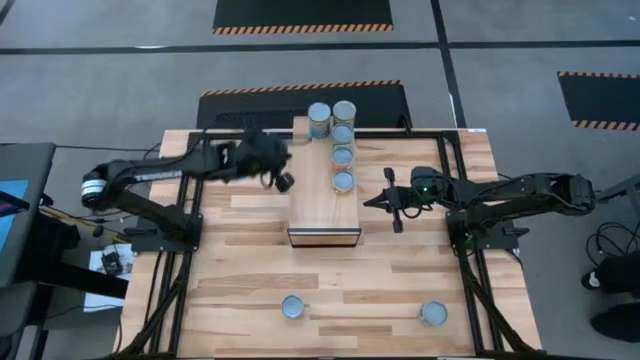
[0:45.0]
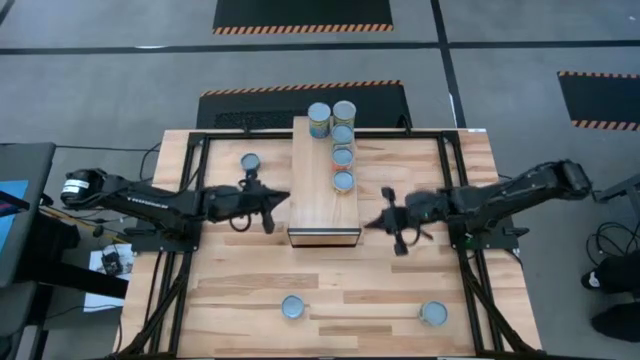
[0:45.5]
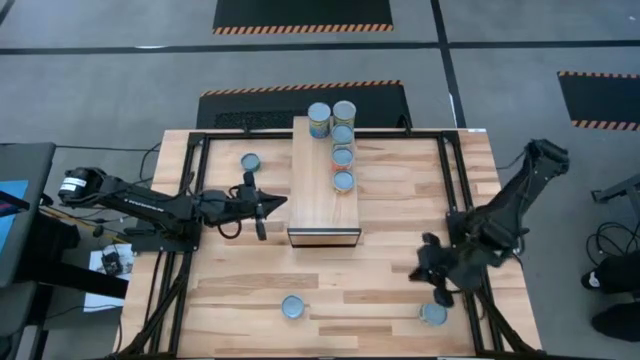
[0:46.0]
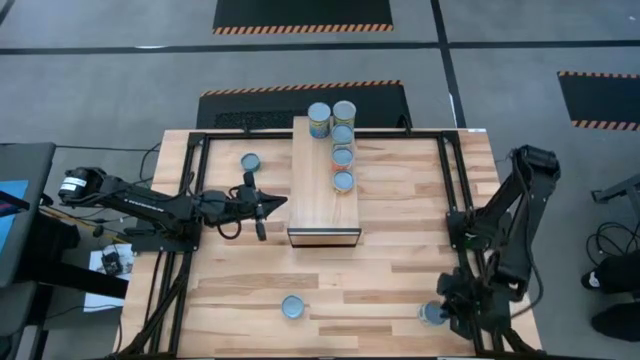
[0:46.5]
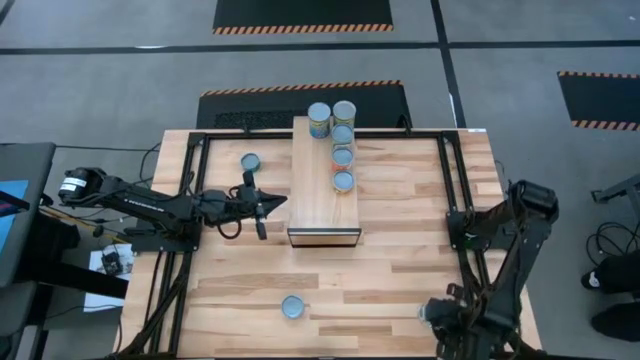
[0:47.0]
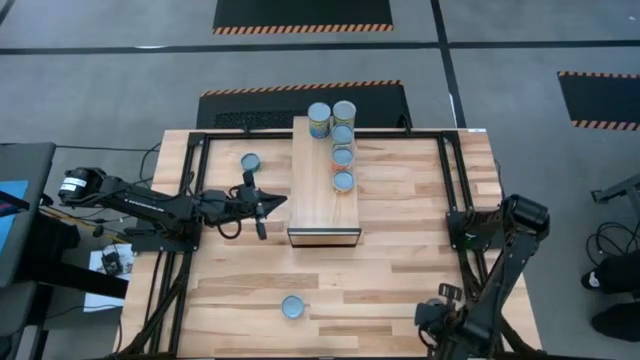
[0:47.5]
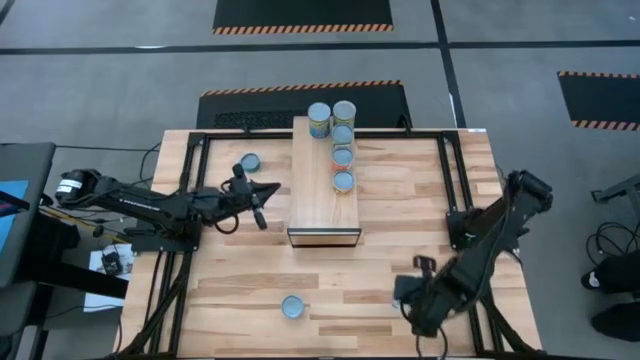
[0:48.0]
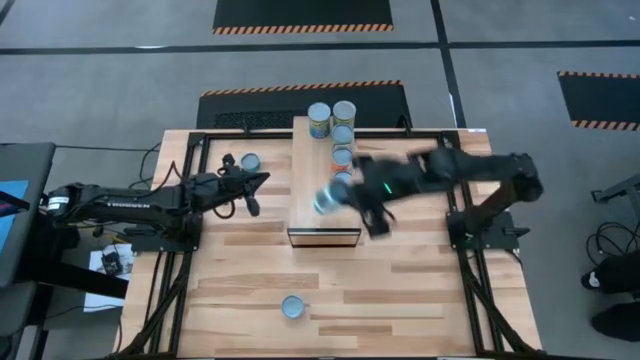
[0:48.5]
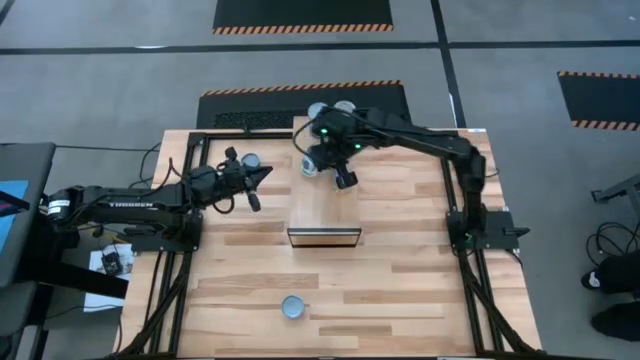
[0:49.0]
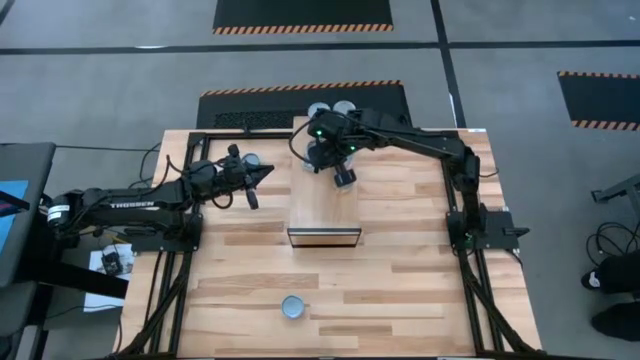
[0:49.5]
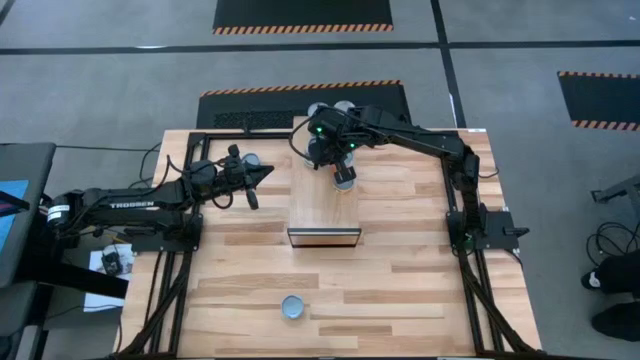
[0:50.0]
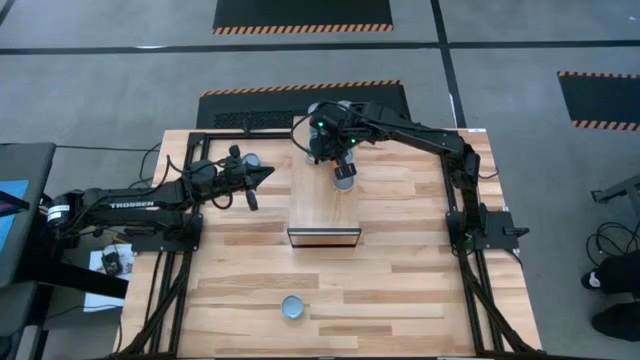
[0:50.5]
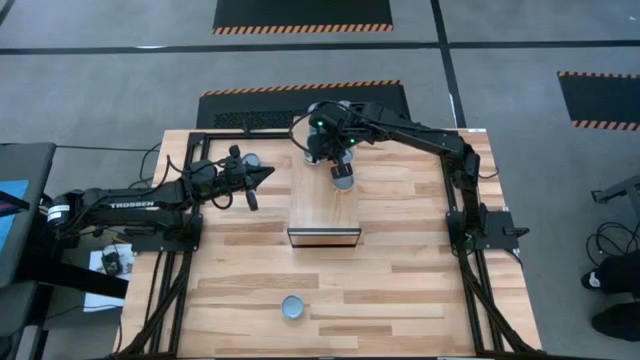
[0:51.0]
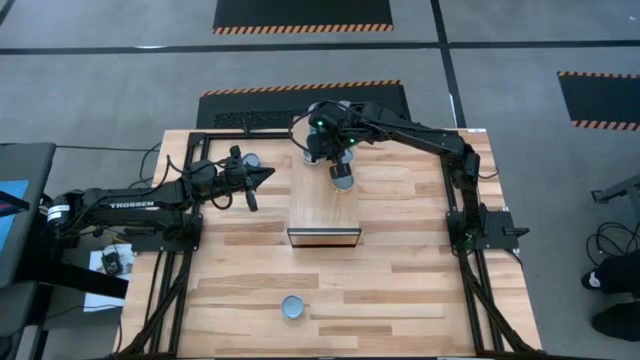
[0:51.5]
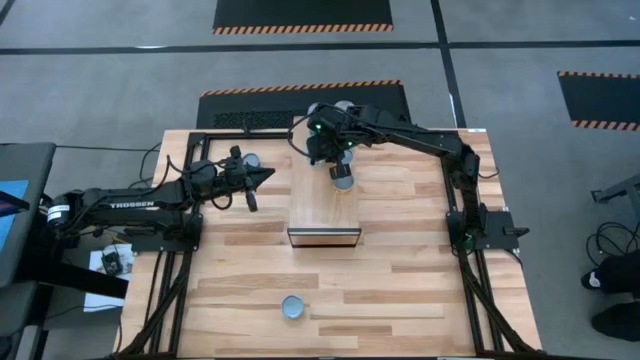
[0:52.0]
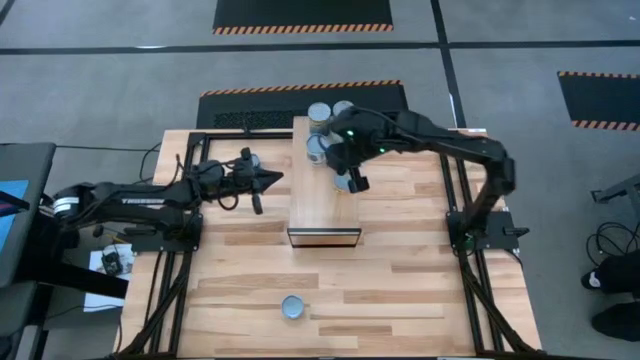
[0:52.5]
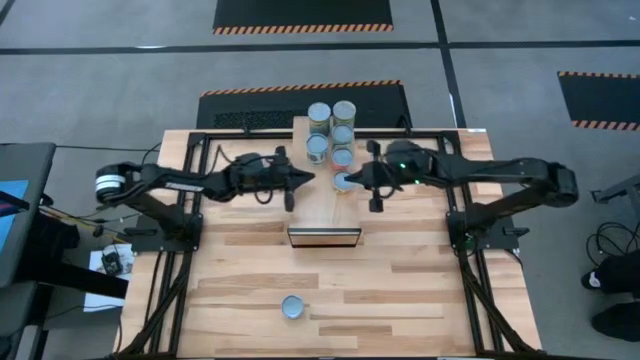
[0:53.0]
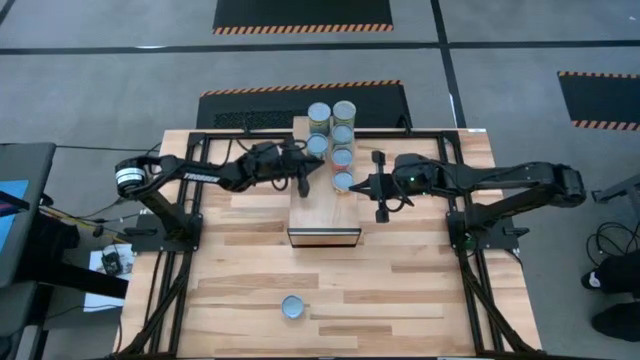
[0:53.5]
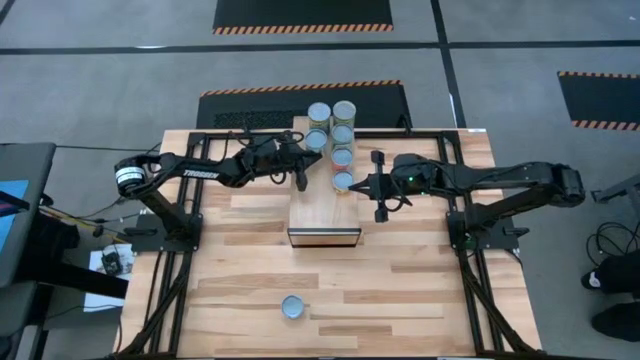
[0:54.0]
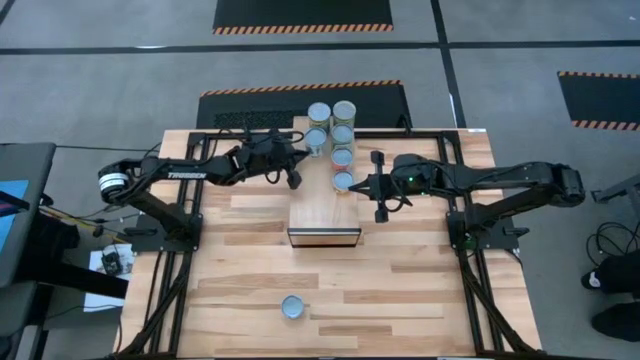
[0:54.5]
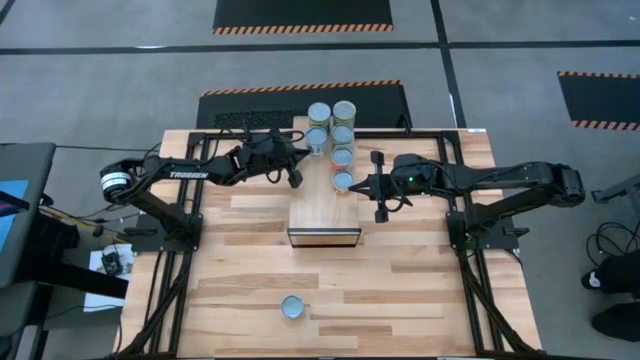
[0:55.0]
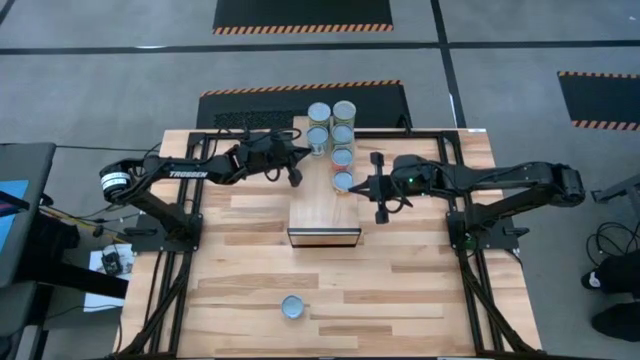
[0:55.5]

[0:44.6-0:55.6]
Task: Pick and place cans onto a shelf
Put the canned mixed vegetables on the shelf

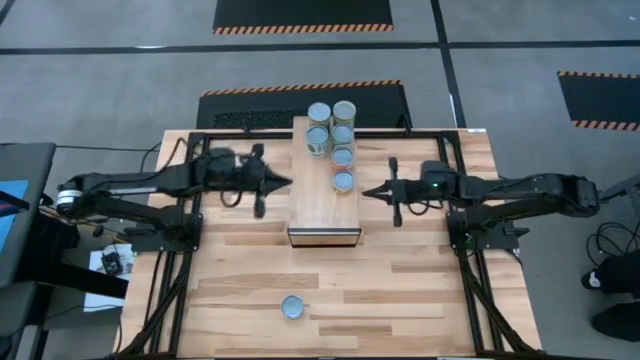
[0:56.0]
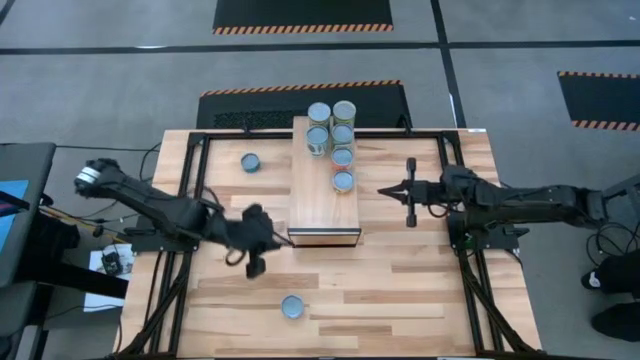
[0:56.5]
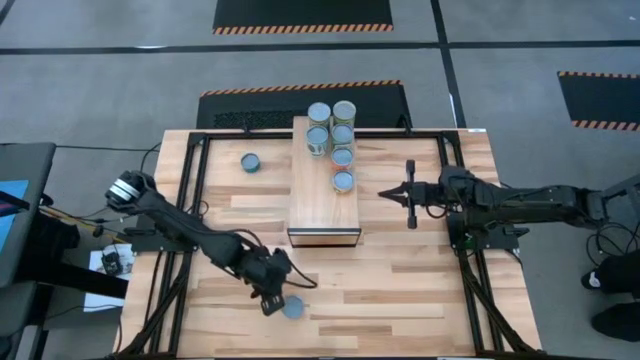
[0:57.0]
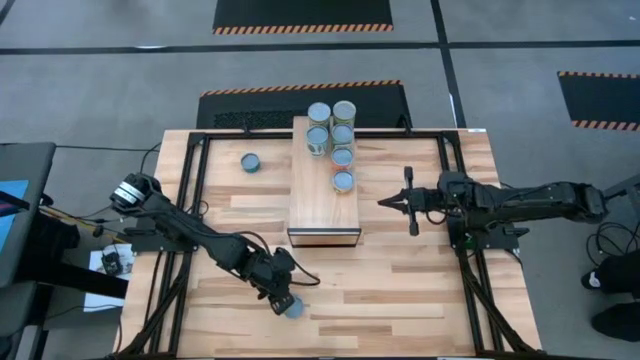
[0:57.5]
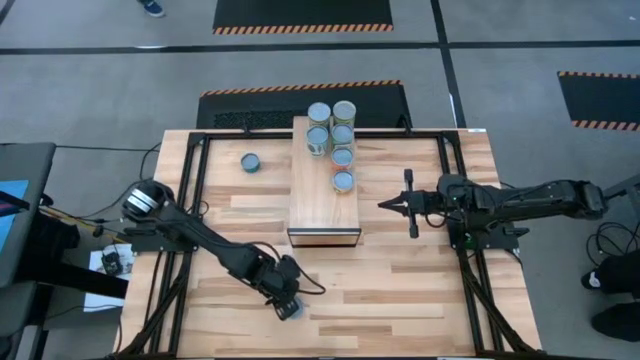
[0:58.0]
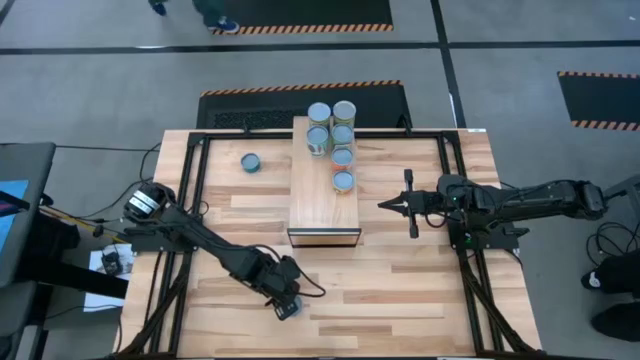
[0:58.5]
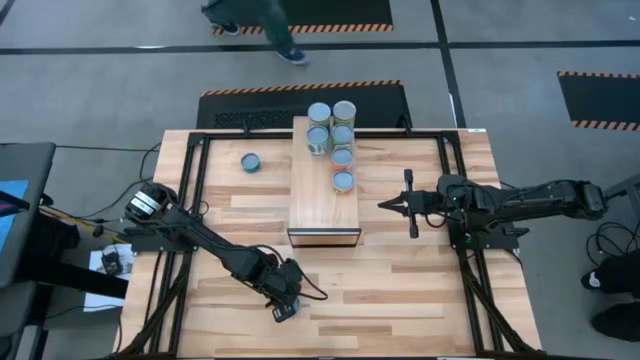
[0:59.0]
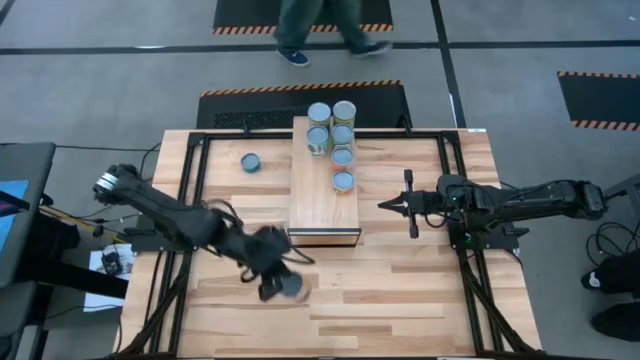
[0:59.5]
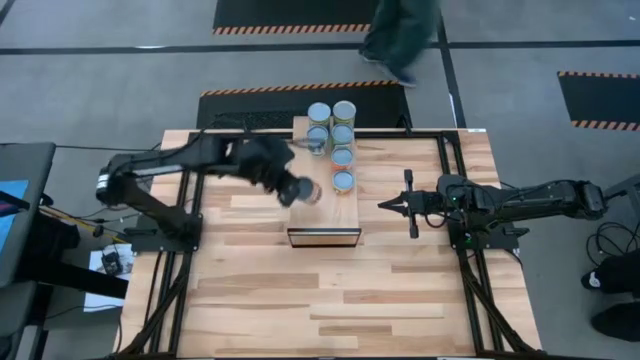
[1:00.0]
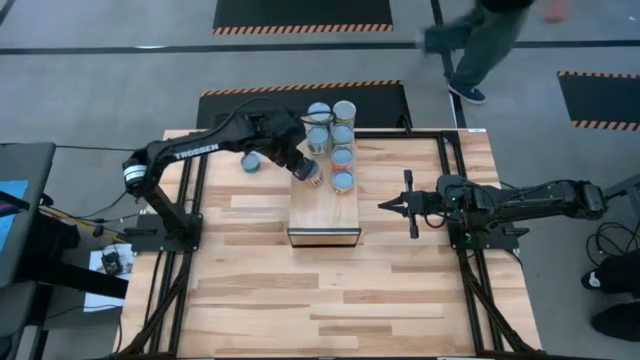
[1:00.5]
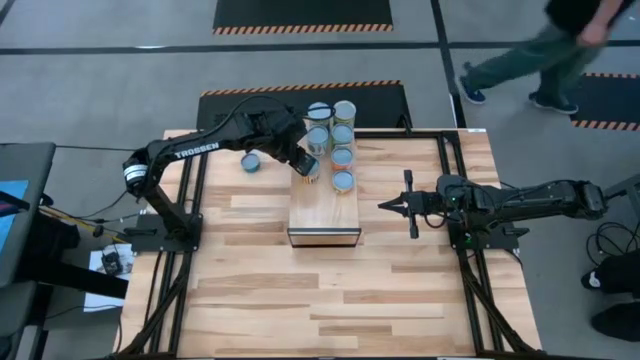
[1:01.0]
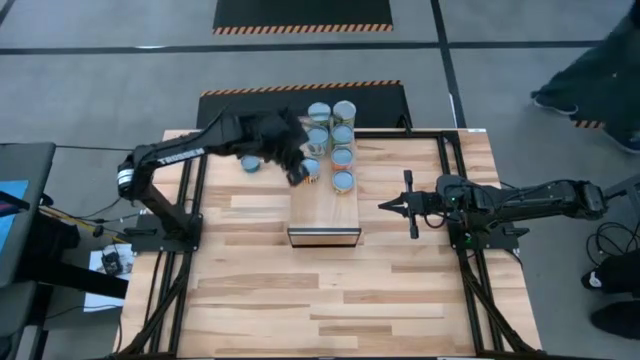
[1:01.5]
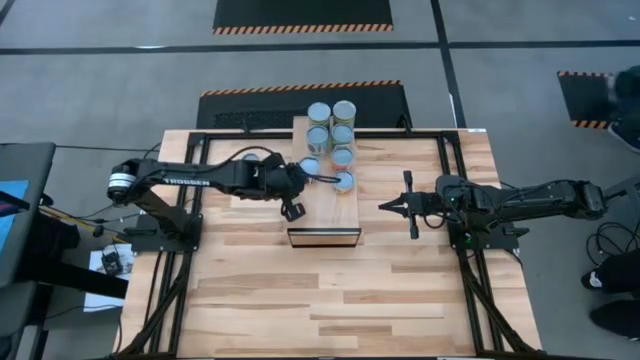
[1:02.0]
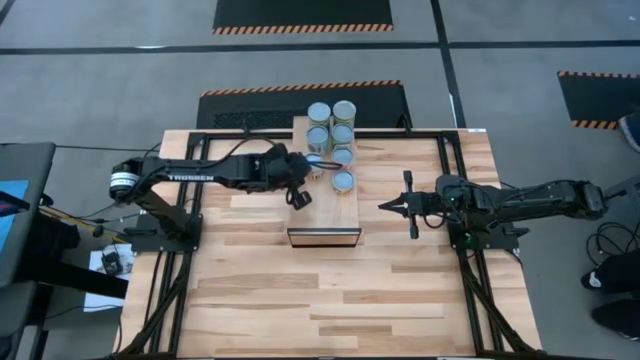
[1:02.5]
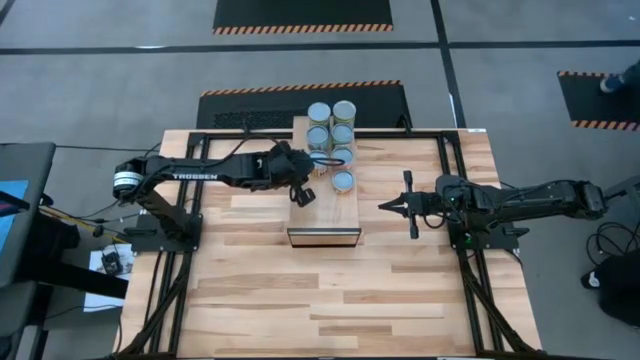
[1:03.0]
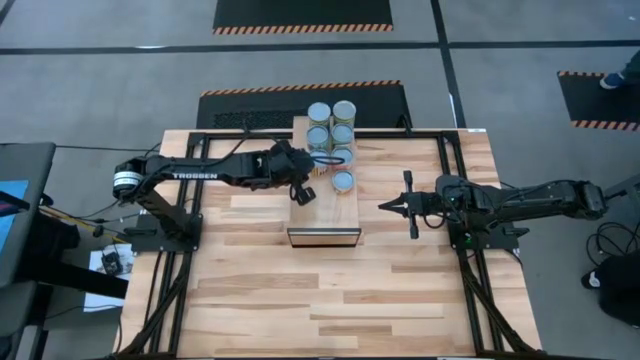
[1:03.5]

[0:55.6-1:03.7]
Put the canned spicy black beans on the shelf

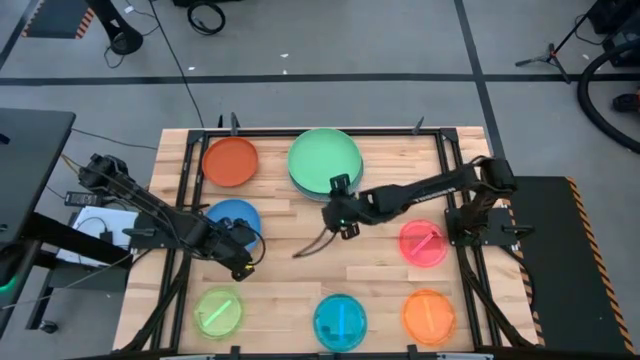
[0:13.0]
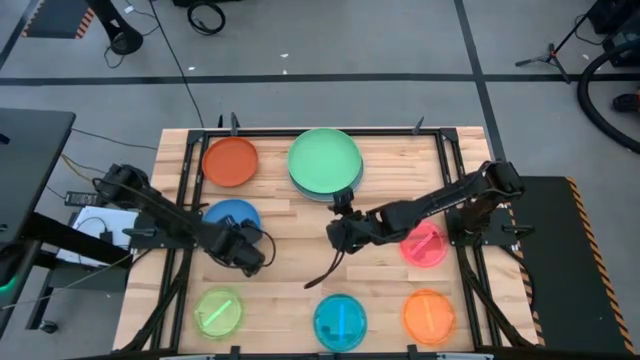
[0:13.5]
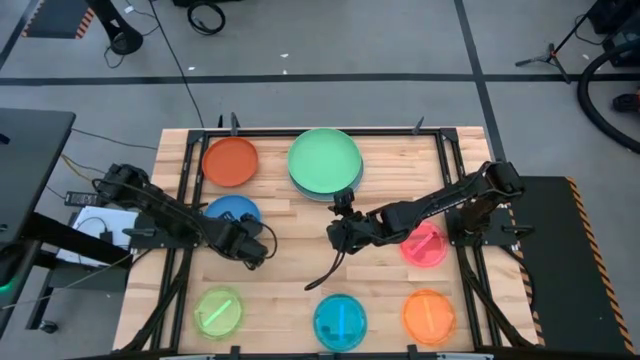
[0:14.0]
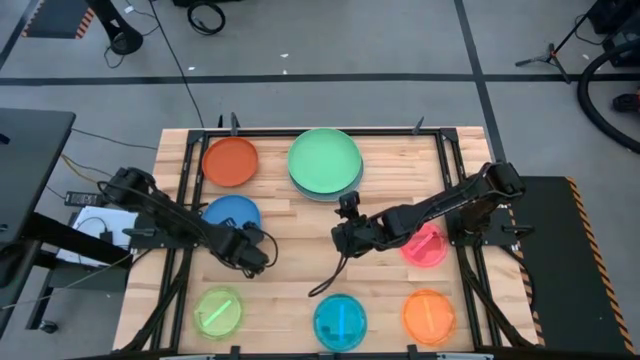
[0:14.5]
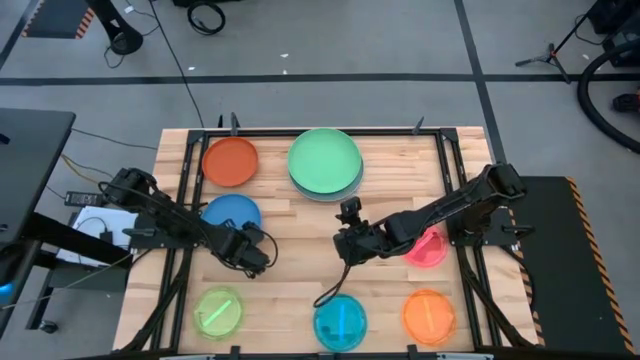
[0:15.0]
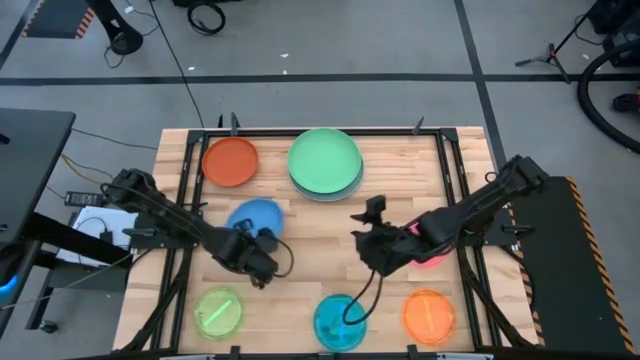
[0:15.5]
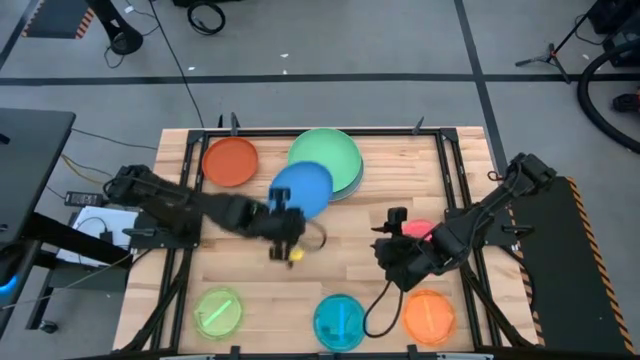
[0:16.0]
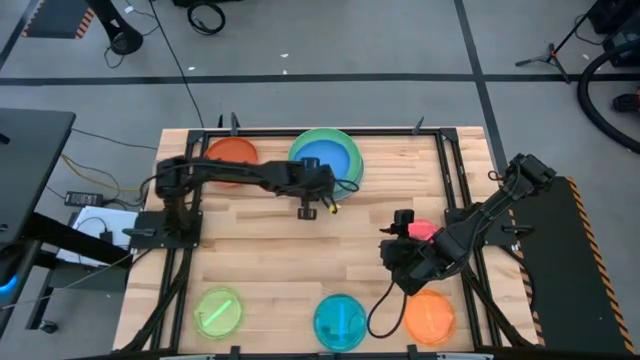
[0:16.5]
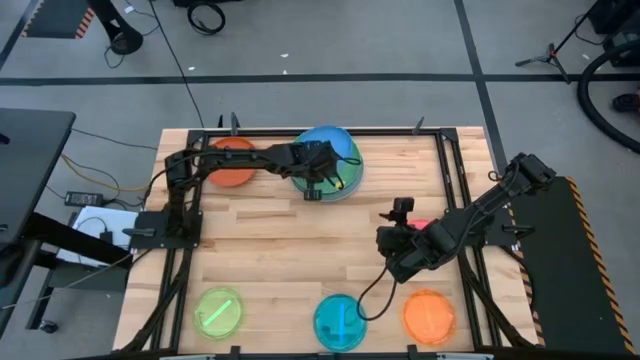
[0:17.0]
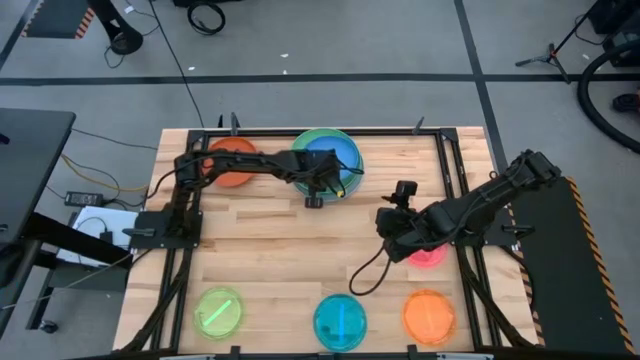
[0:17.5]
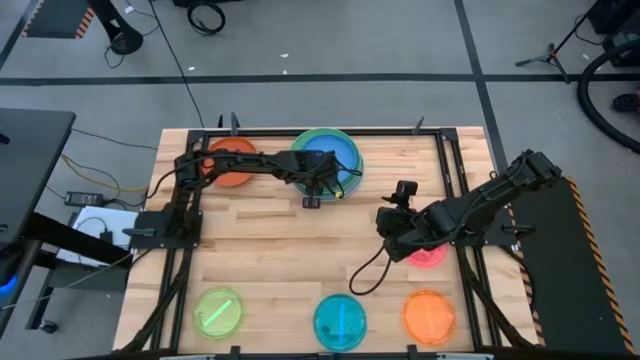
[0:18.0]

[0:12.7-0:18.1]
Task: Stack plastic plates
Stack the dark blue plate on top of the light green plate
